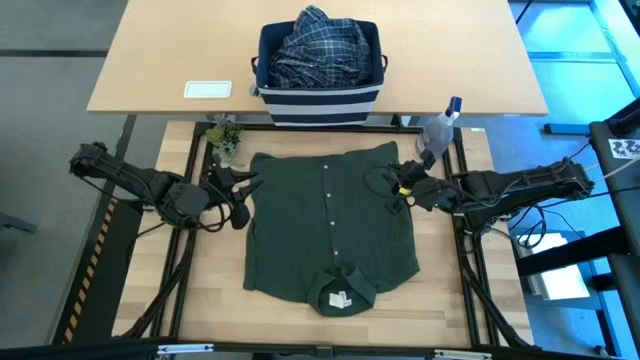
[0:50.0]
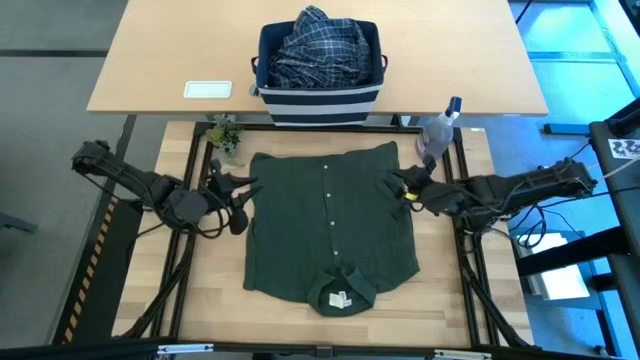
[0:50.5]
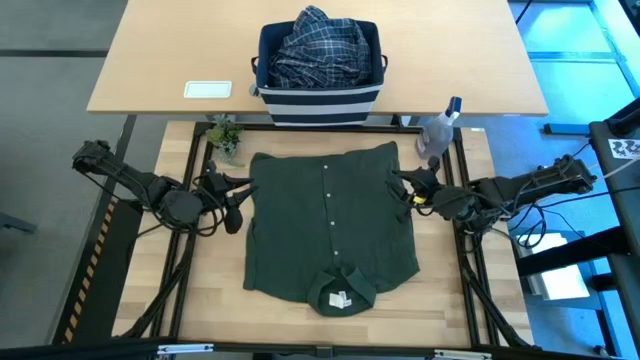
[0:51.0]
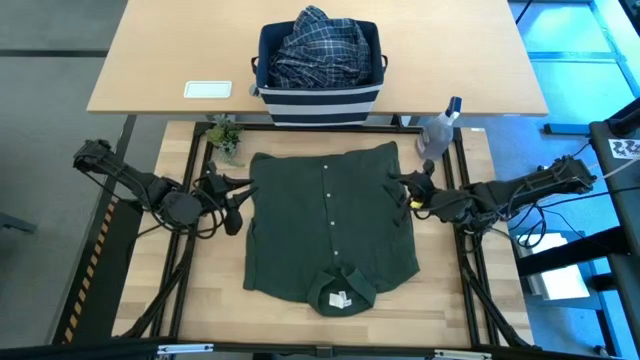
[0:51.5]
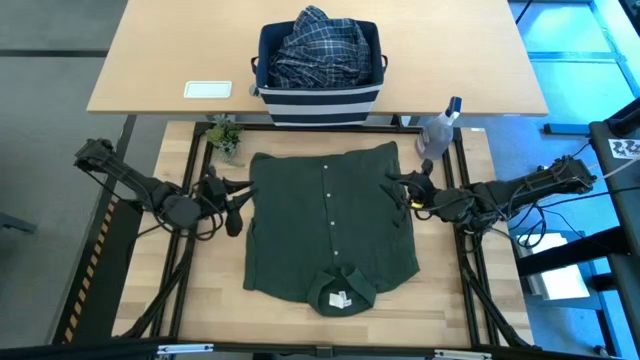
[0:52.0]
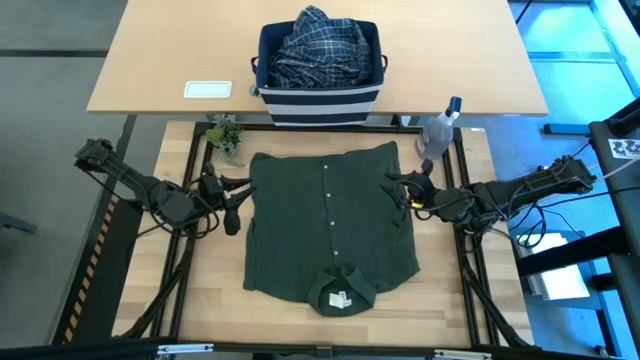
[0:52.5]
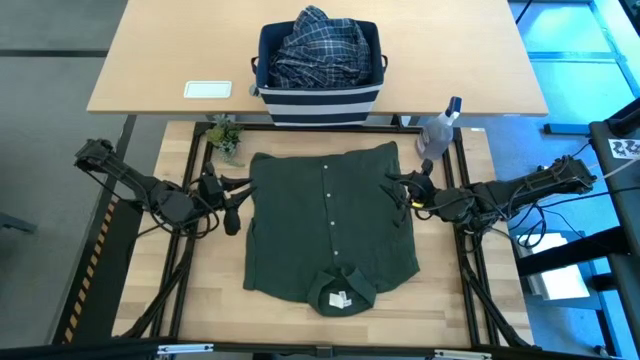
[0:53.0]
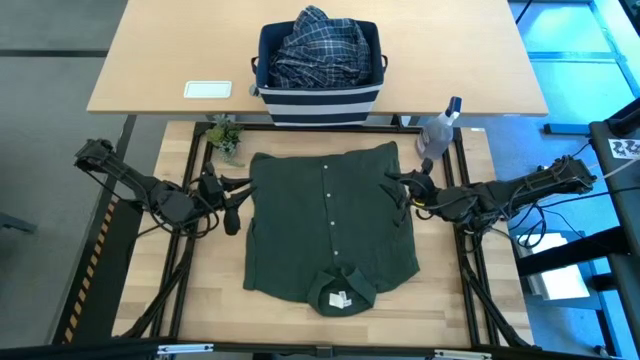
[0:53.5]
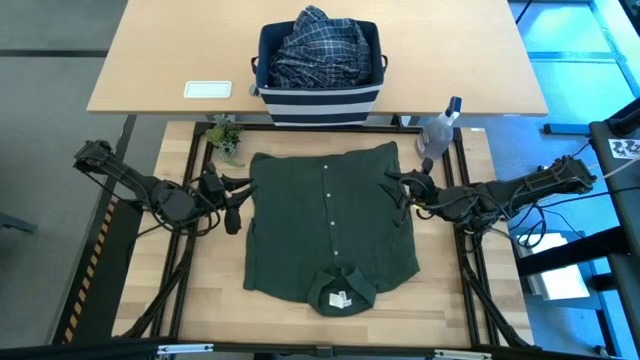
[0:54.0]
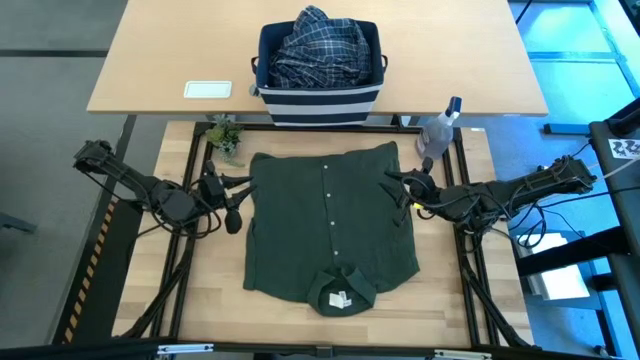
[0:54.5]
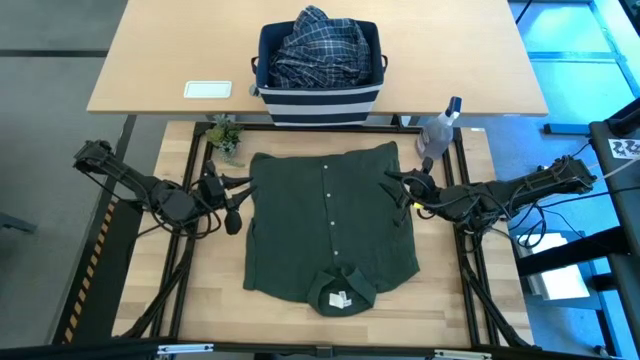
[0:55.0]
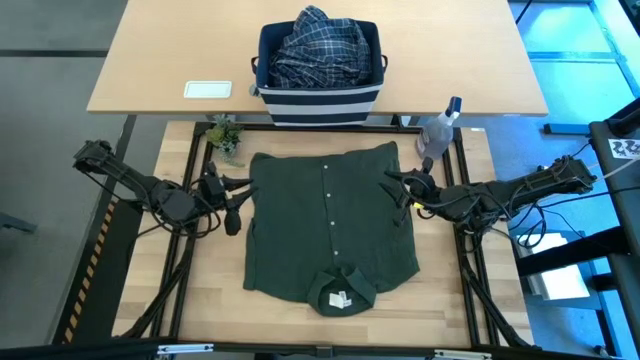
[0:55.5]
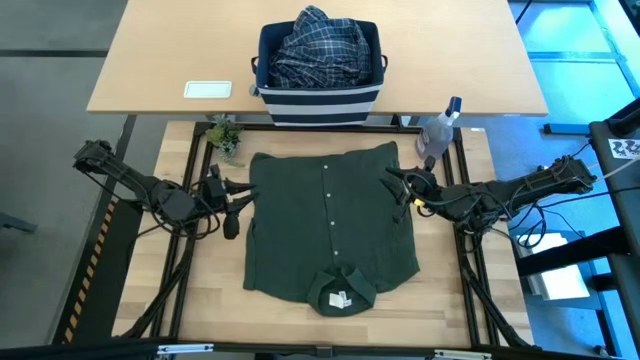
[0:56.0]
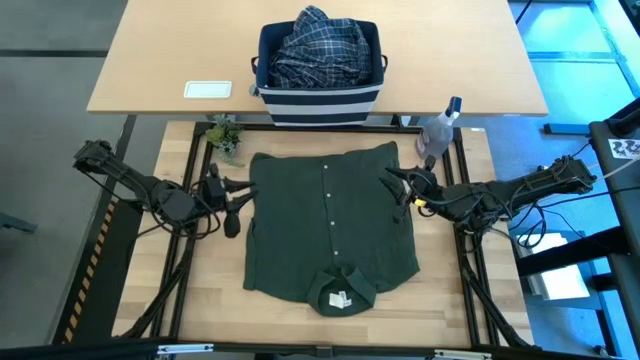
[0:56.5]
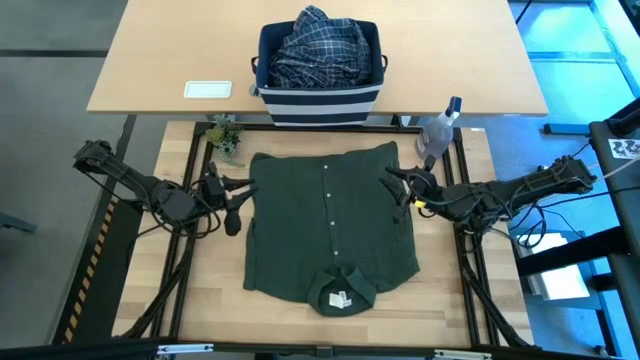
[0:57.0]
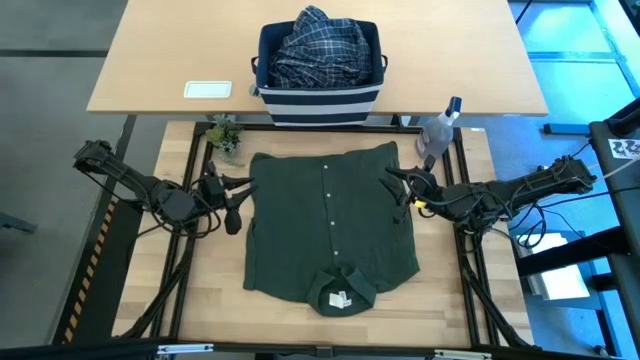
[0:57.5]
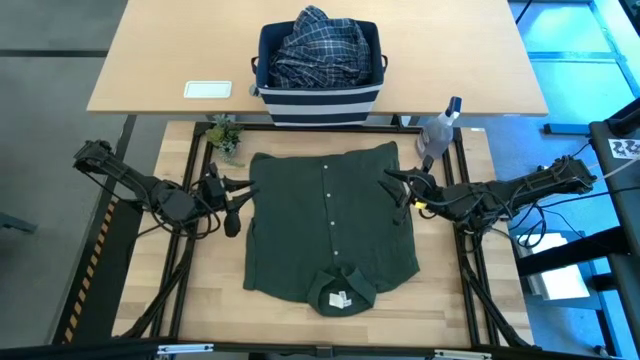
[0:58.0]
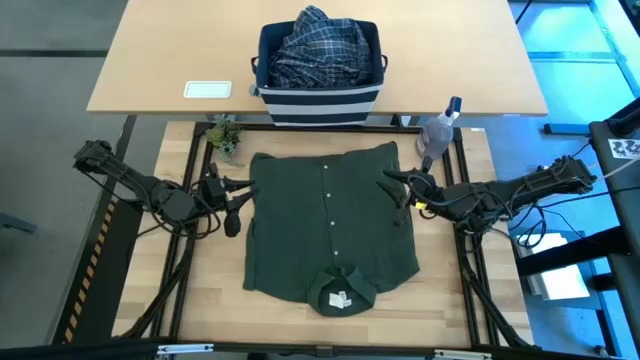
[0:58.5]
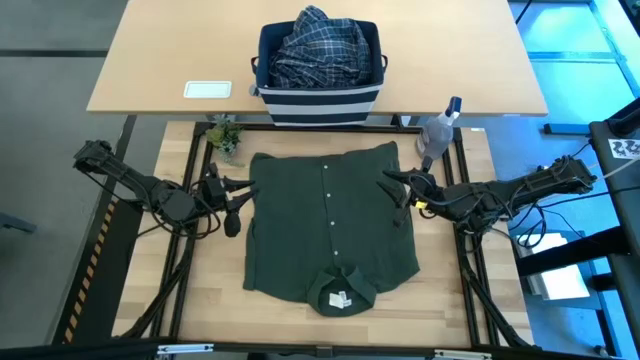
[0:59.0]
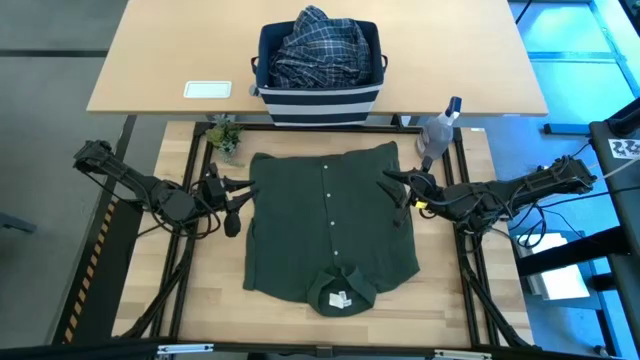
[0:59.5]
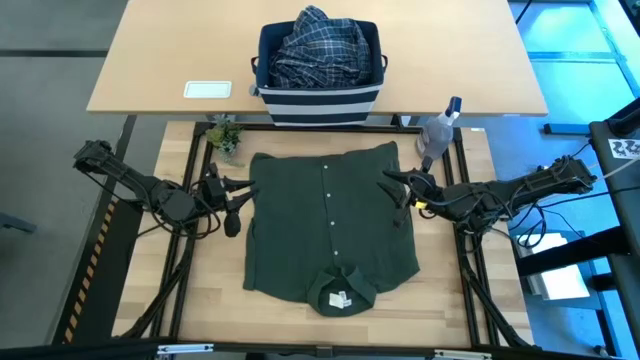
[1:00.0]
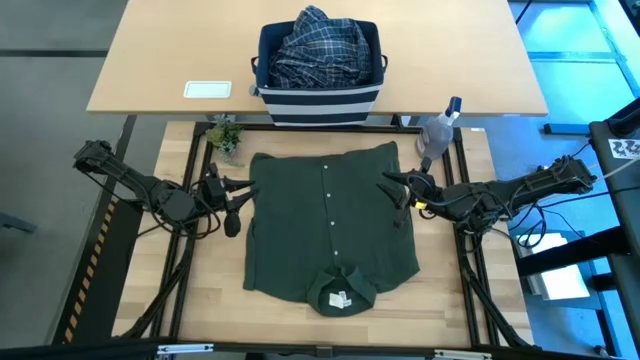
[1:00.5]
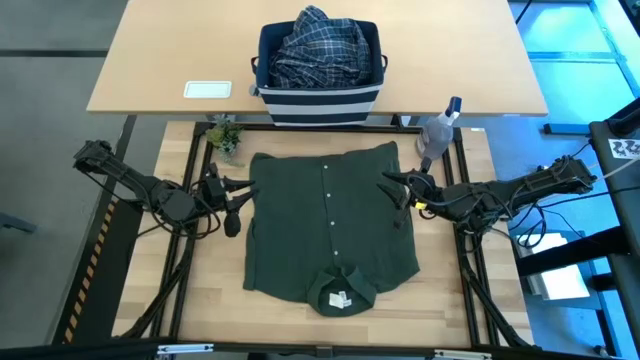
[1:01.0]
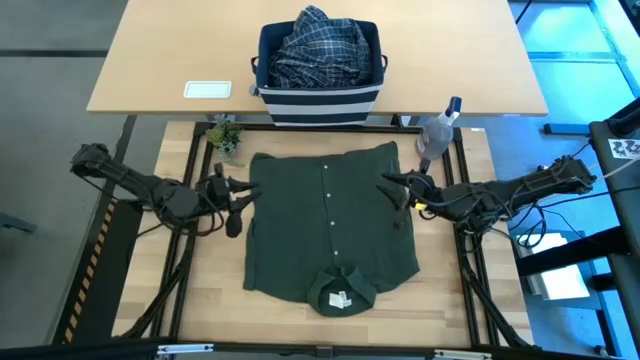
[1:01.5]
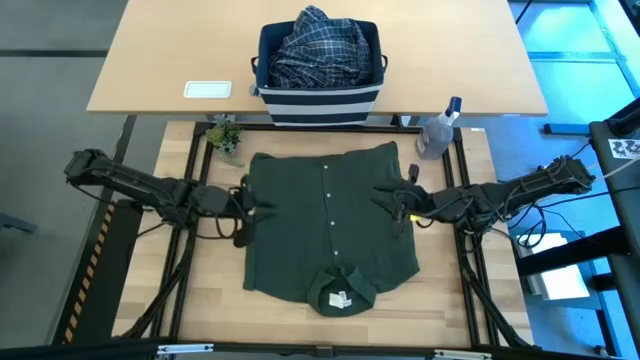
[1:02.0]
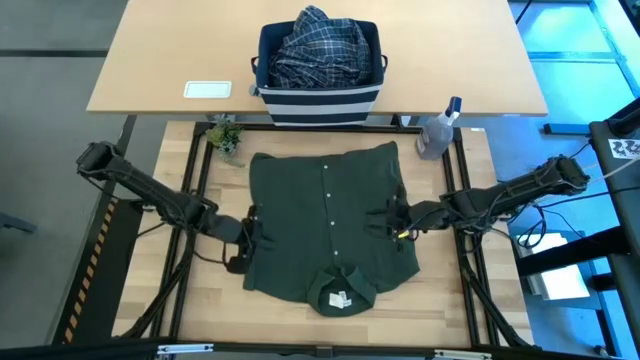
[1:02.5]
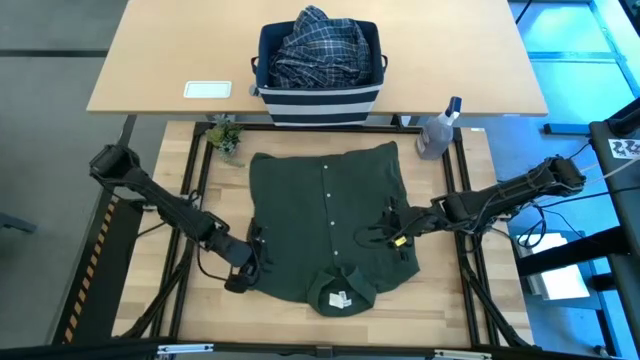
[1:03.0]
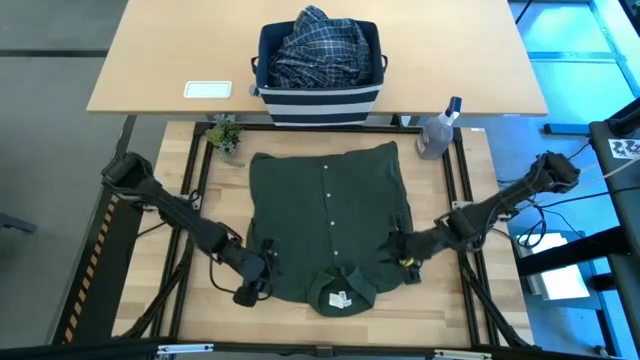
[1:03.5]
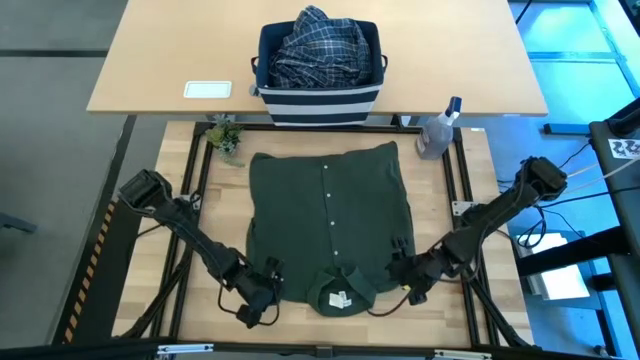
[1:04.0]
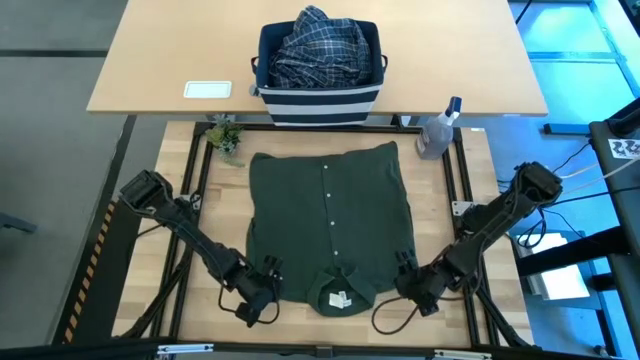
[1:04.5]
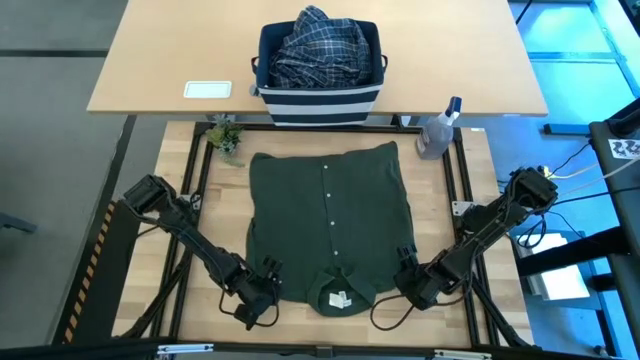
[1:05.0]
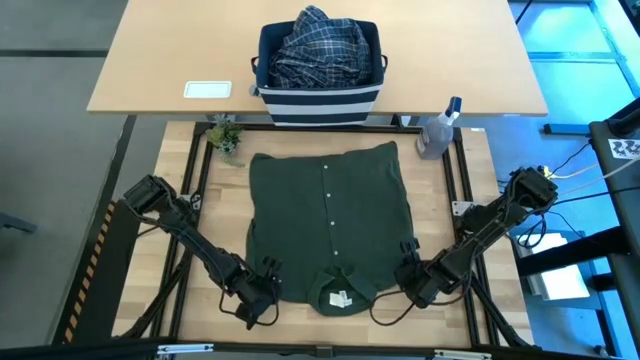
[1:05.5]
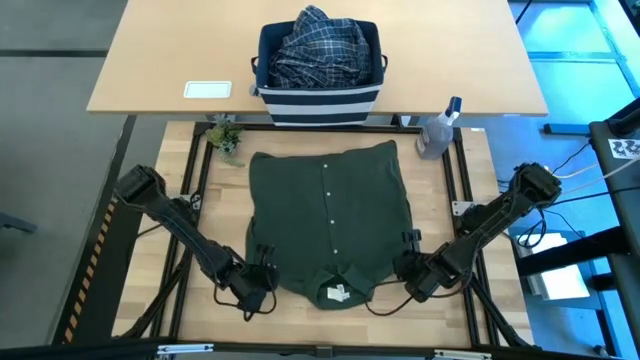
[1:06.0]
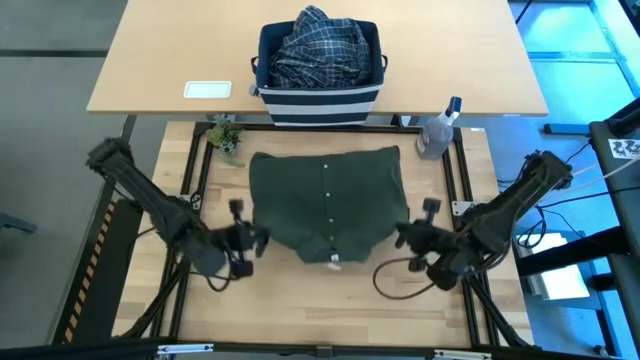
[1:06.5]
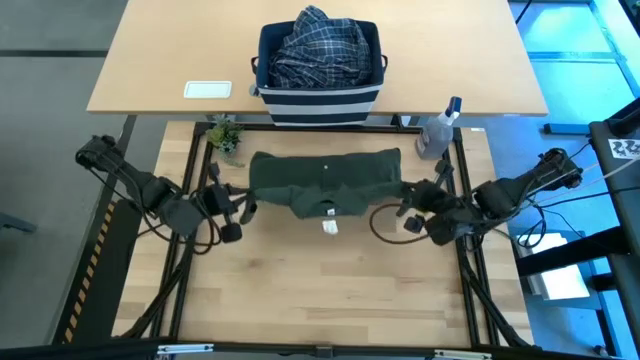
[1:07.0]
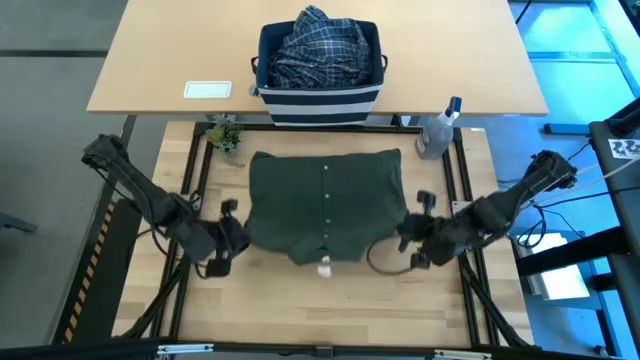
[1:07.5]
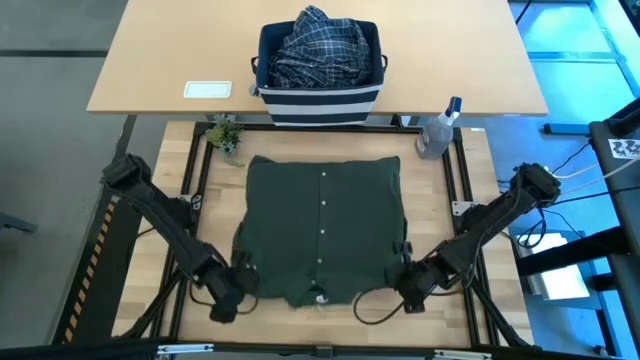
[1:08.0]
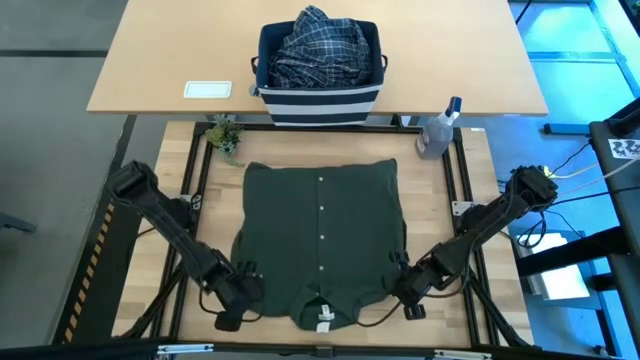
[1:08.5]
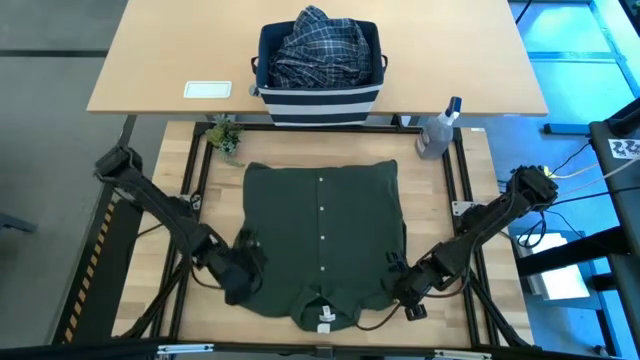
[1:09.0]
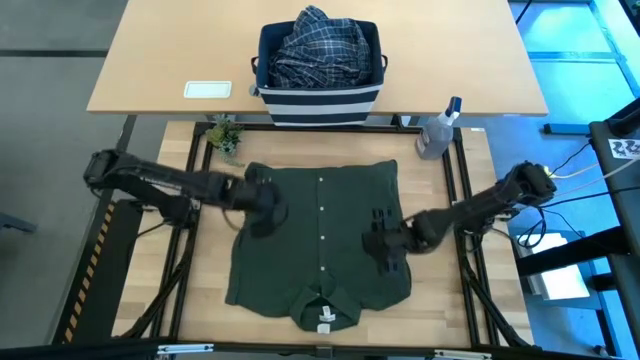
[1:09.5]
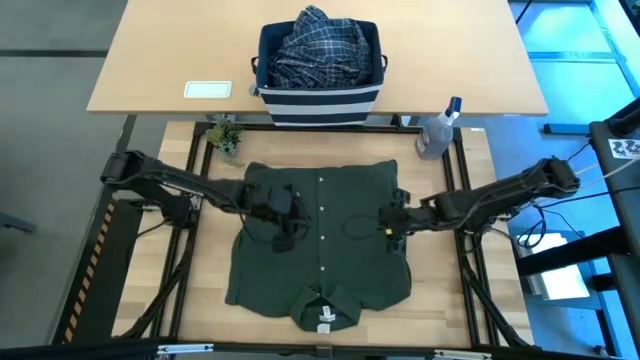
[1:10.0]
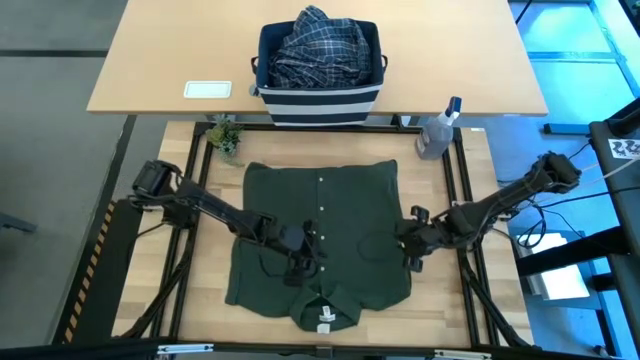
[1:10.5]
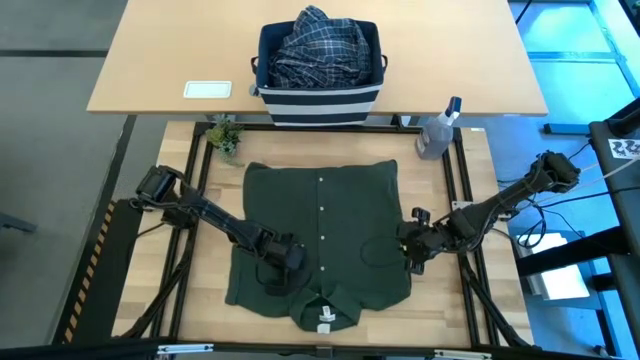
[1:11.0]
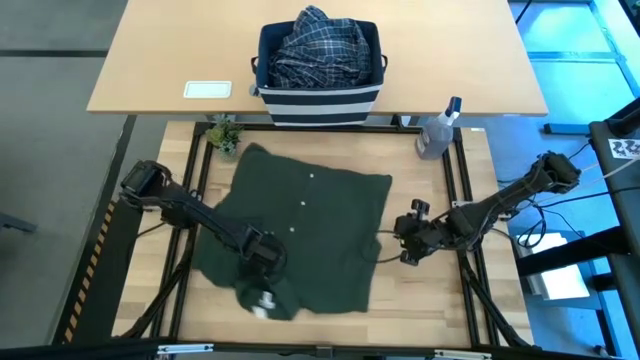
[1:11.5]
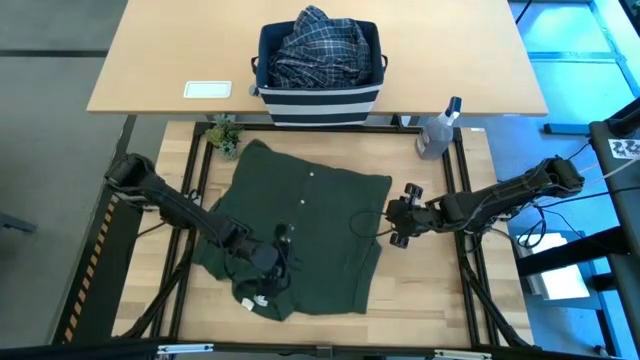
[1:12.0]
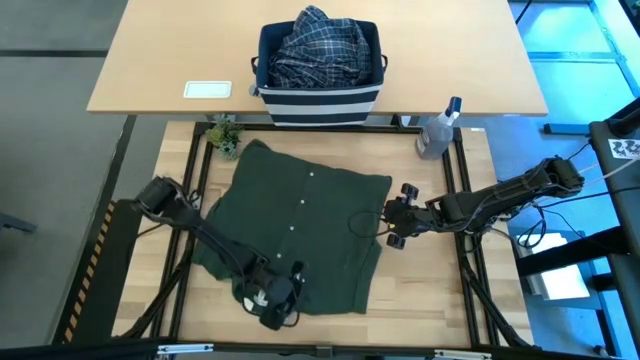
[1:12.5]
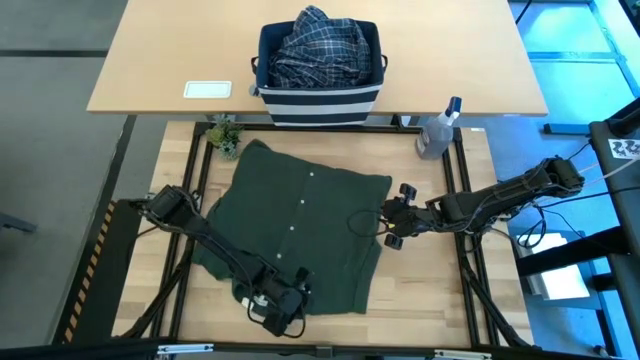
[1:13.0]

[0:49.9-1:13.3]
Task: Fold Laundry from Bin
Fold the green polo shirt
